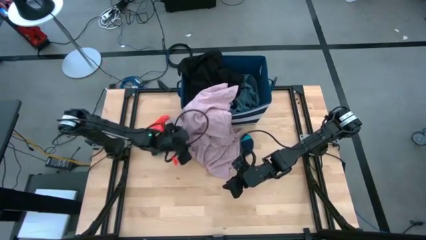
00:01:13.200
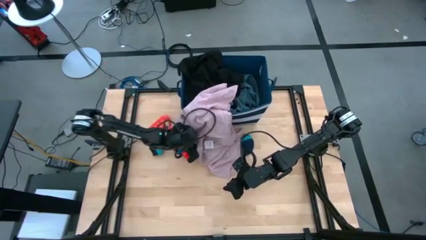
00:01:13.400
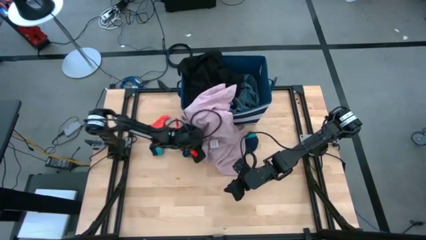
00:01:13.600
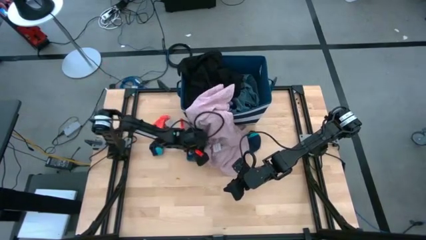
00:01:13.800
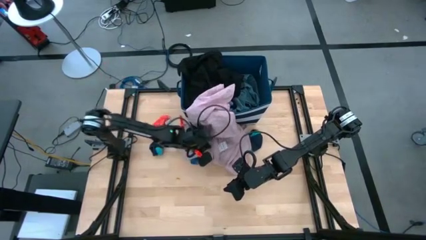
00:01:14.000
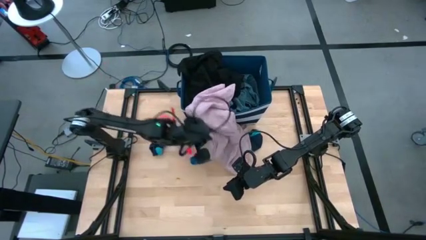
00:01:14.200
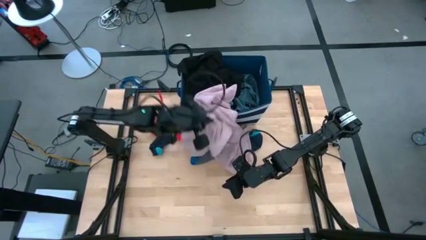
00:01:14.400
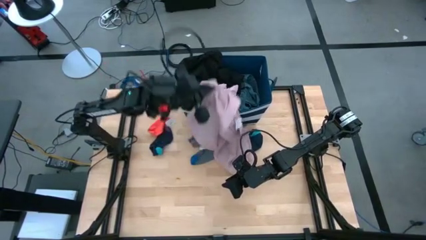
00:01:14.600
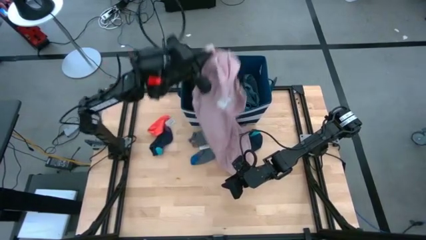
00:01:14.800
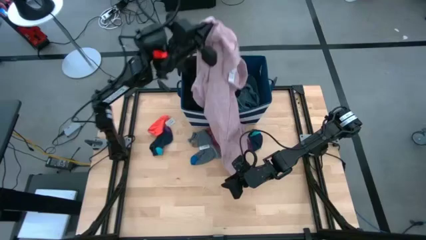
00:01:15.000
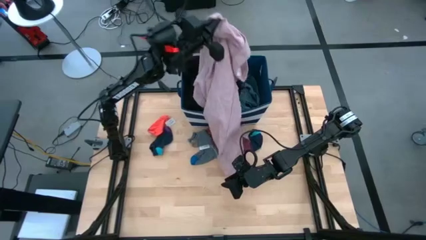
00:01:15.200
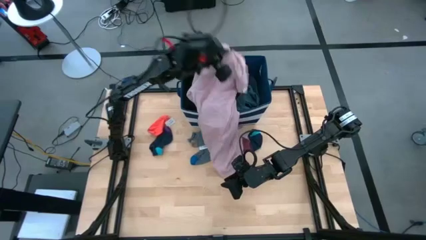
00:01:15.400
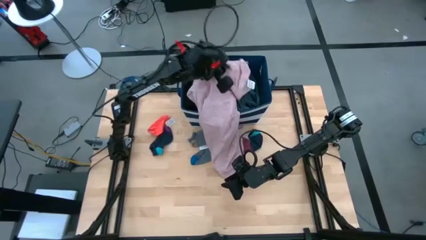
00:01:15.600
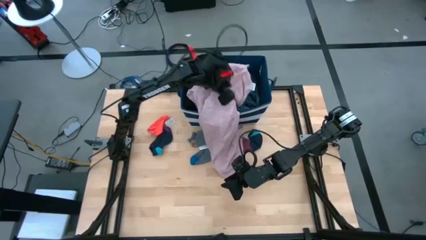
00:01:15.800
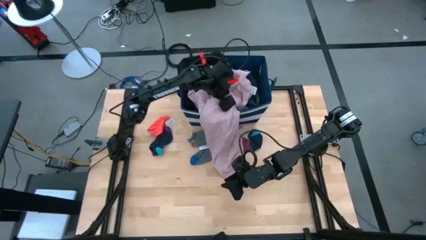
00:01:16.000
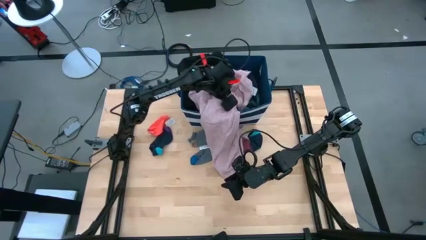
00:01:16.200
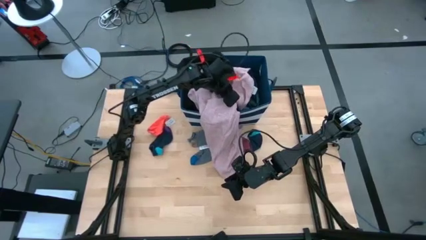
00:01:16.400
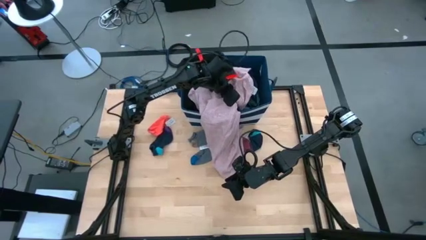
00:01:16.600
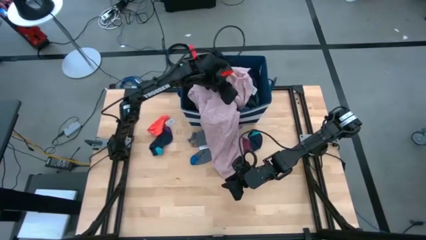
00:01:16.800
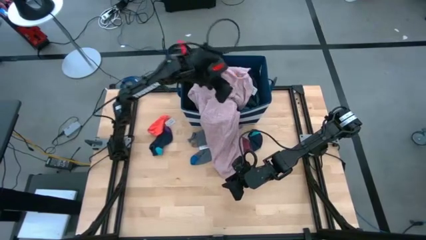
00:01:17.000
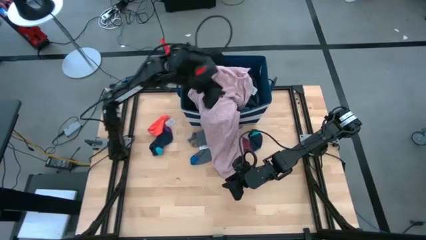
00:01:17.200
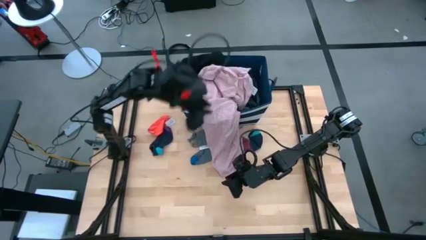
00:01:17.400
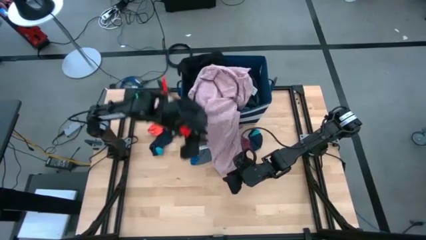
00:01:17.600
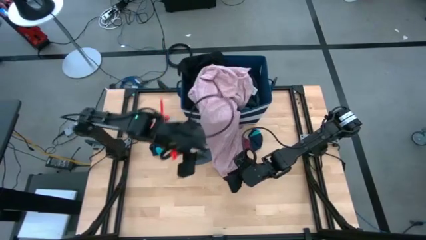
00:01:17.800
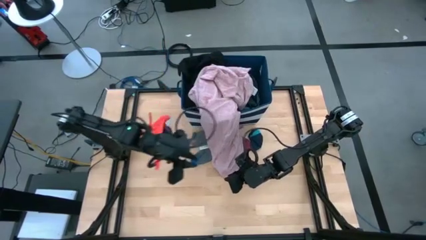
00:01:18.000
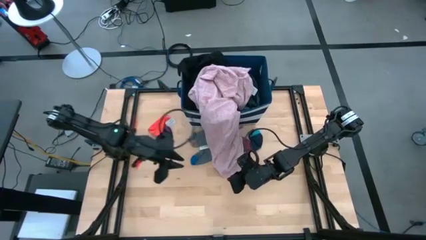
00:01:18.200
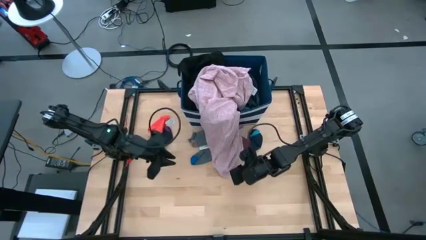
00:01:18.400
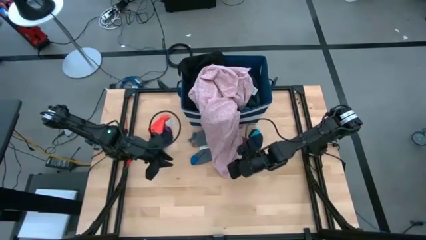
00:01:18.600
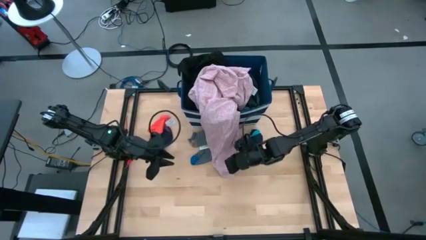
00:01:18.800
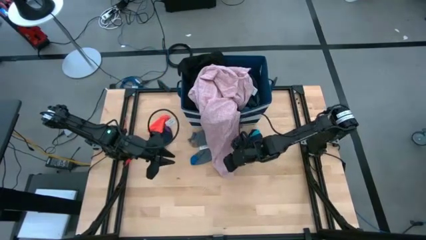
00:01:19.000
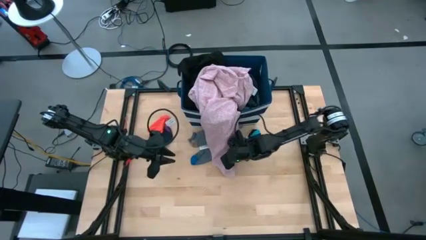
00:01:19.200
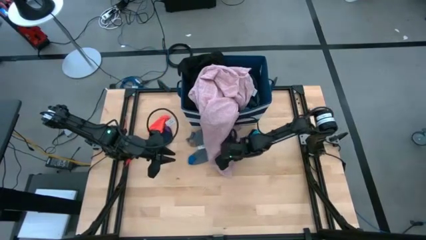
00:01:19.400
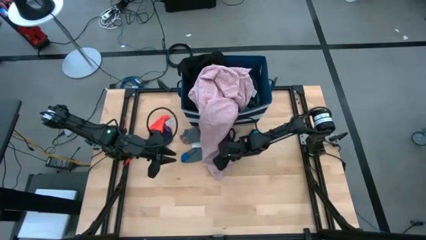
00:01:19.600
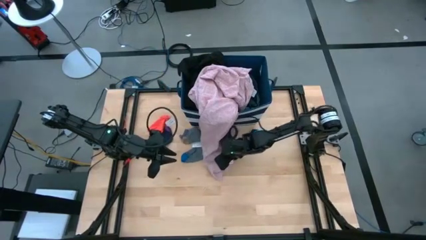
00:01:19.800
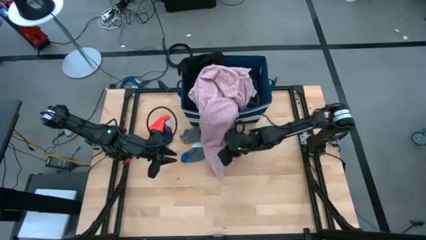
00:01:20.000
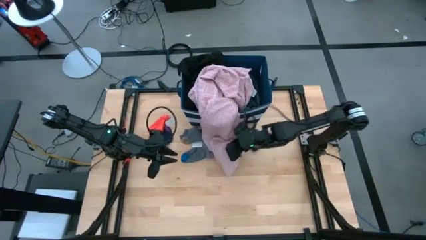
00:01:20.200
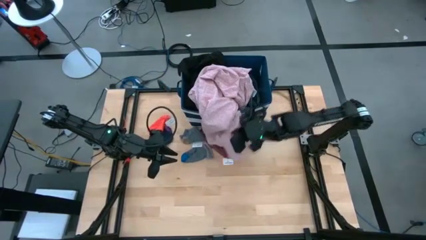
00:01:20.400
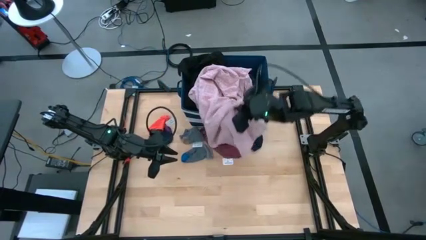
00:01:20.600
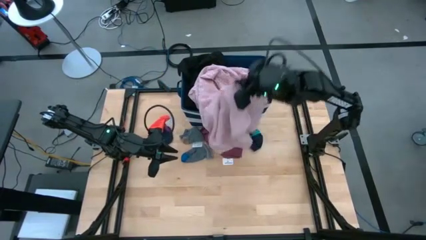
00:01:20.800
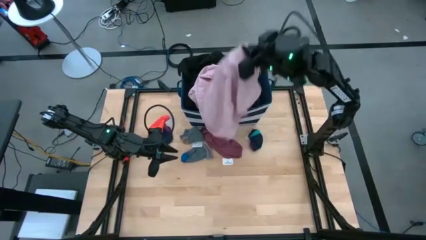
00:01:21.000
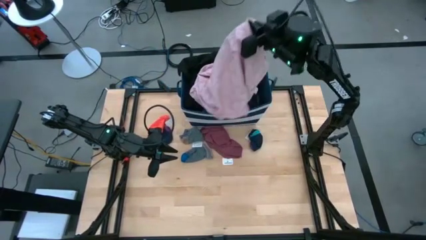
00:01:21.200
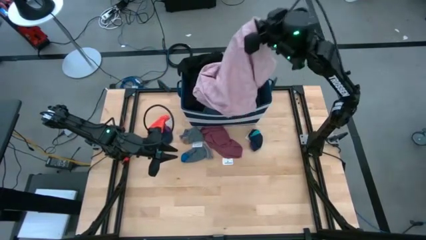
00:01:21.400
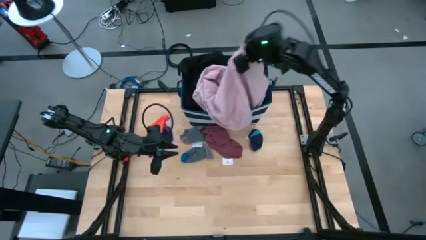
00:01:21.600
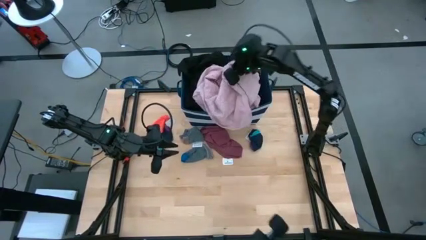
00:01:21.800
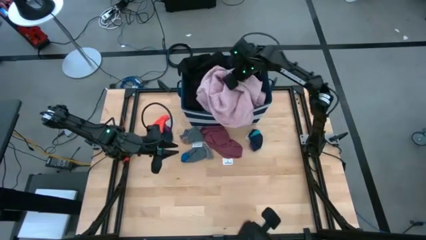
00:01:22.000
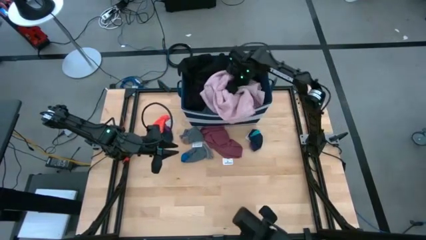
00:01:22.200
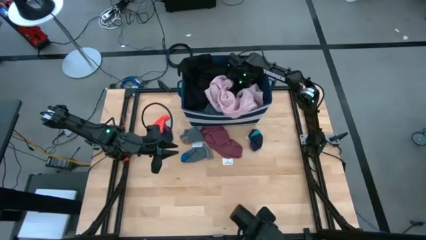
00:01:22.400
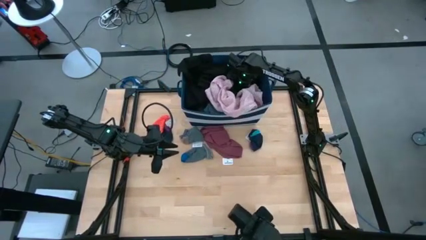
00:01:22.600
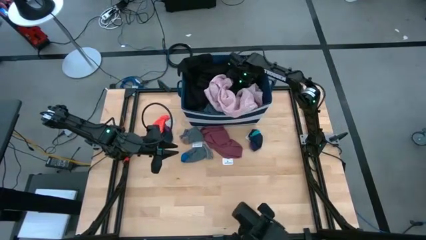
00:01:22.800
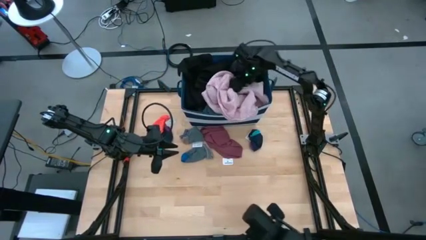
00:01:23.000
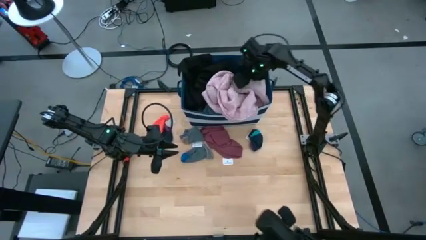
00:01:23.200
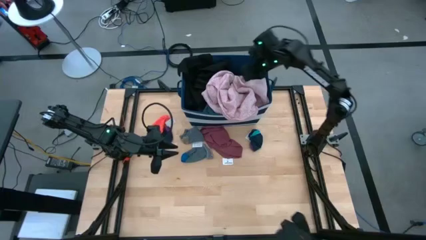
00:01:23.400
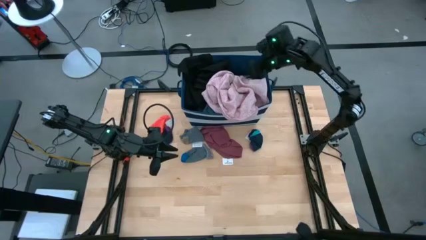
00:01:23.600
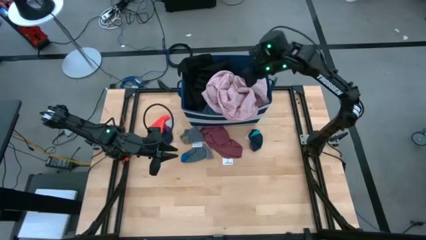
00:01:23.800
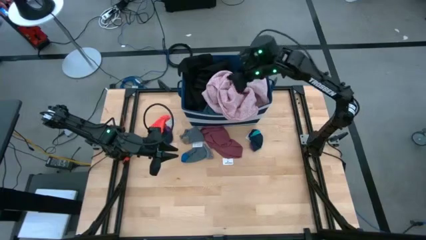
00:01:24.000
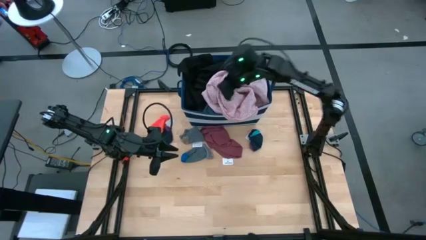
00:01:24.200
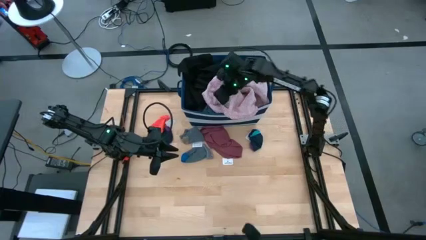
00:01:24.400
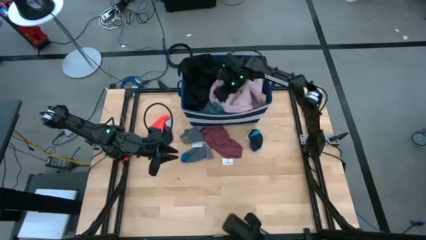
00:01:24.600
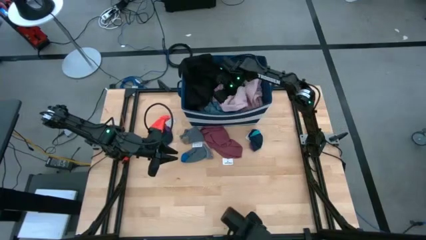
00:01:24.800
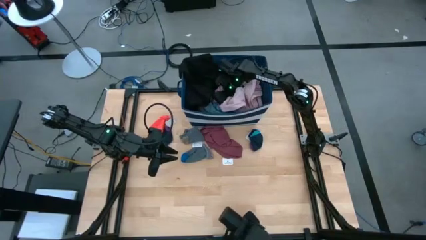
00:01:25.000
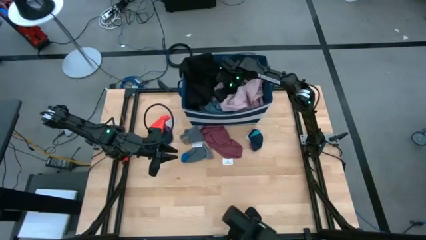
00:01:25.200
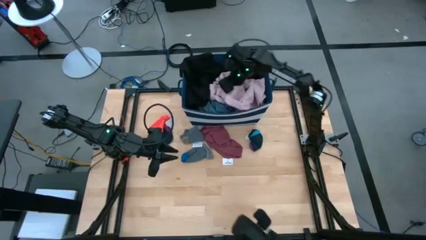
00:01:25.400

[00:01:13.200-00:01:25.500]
Task: Sort clothes
Put the pink shirt into the blue bin

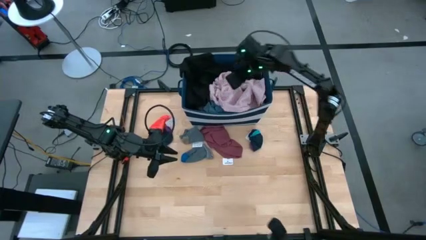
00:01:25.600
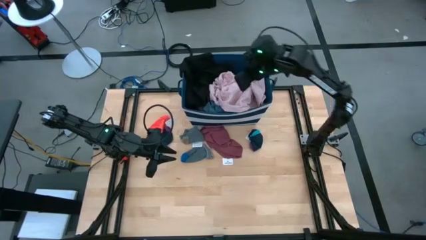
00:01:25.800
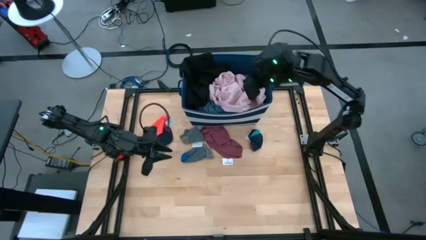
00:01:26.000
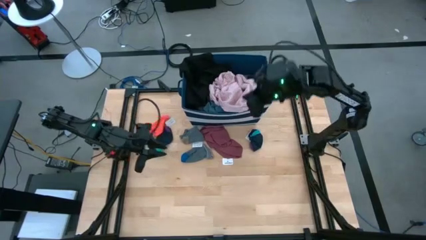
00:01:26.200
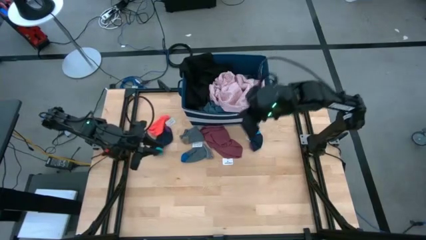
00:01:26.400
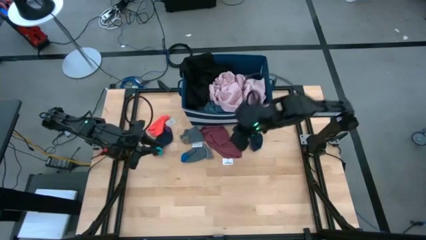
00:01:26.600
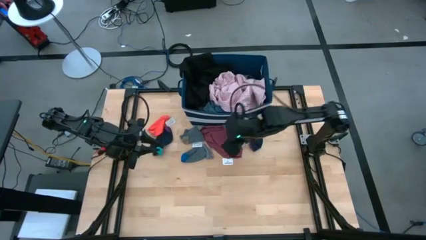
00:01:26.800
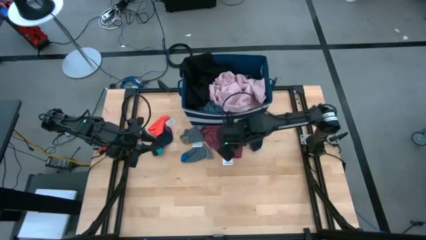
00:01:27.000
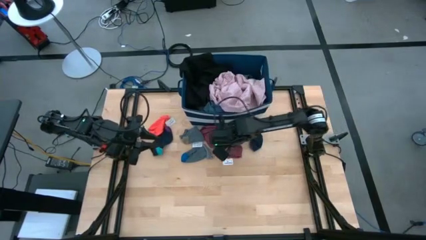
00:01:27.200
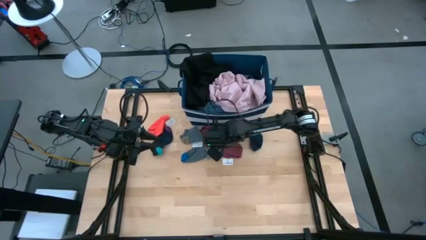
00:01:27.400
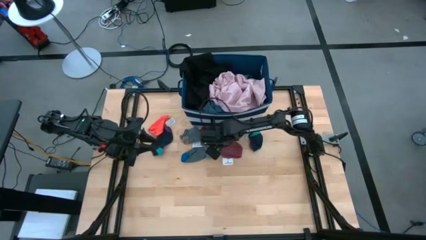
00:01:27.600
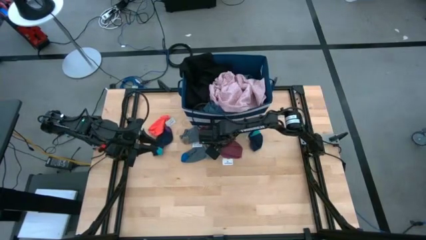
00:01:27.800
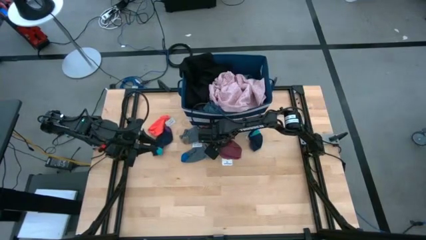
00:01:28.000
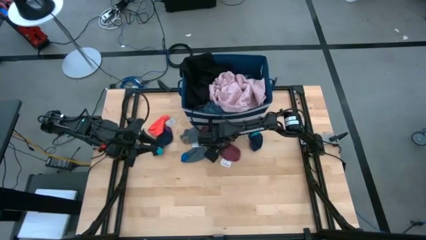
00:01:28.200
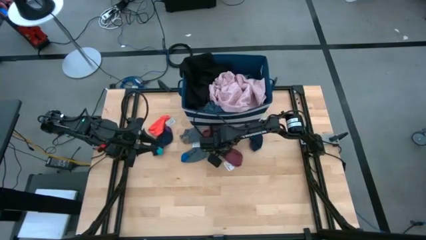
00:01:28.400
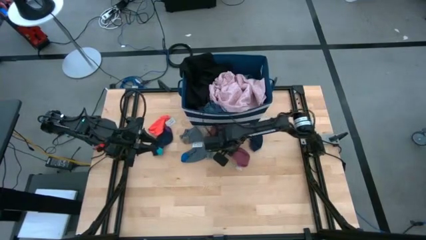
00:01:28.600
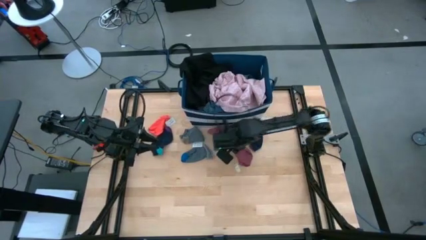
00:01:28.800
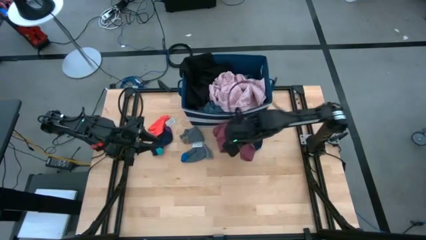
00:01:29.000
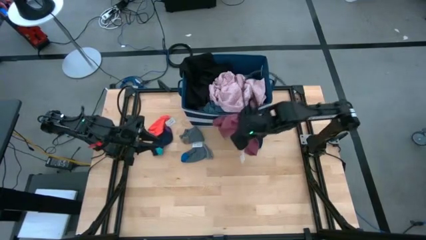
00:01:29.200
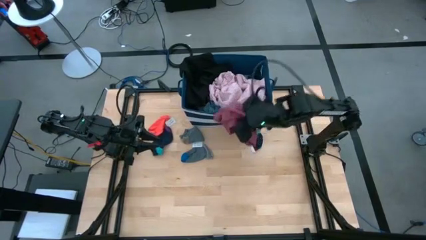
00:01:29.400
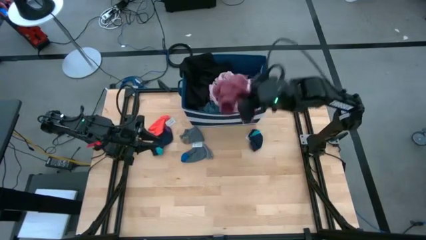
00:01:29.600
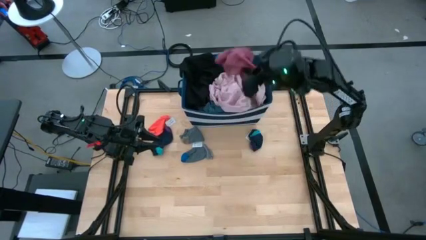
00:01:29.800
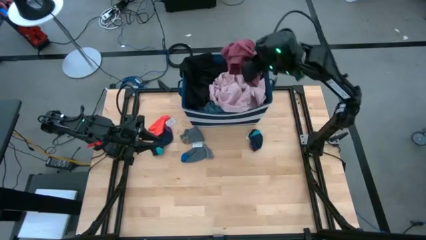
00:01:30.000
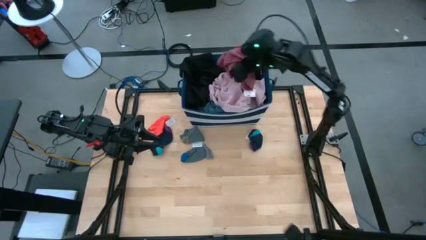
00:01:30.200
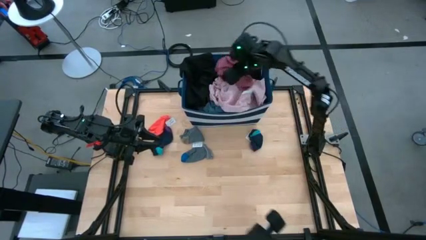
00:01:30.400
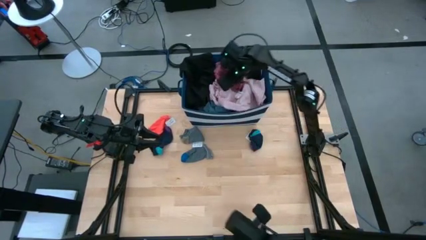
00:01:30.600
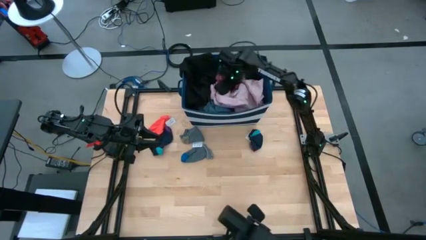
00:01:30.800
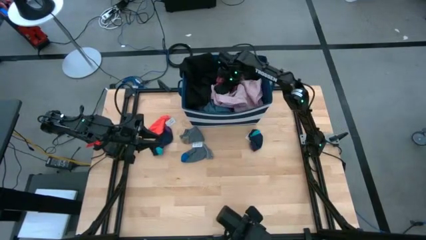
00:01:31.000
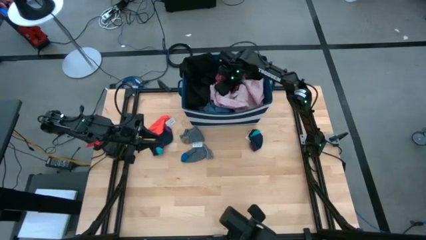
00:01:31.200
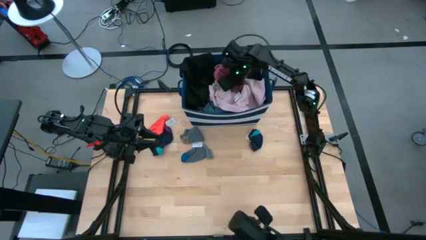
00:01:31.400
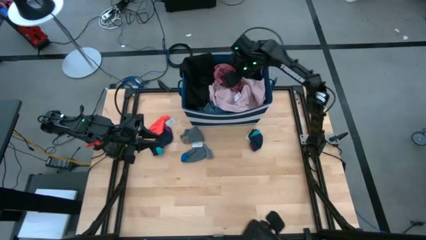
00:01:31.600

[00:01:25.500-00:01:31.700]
Put the red underwear into the blue bin
